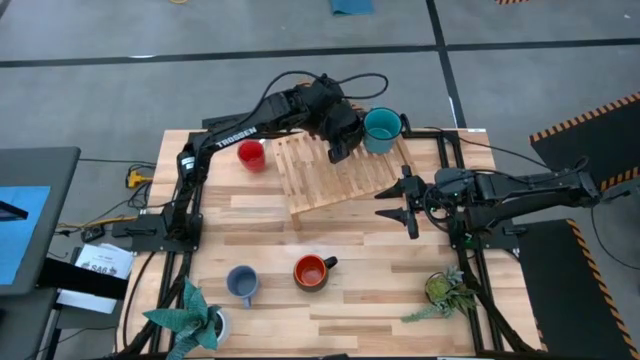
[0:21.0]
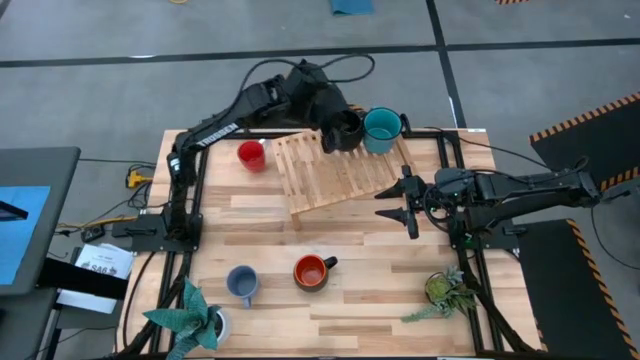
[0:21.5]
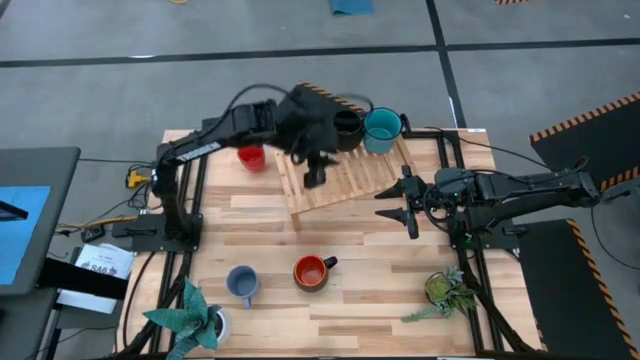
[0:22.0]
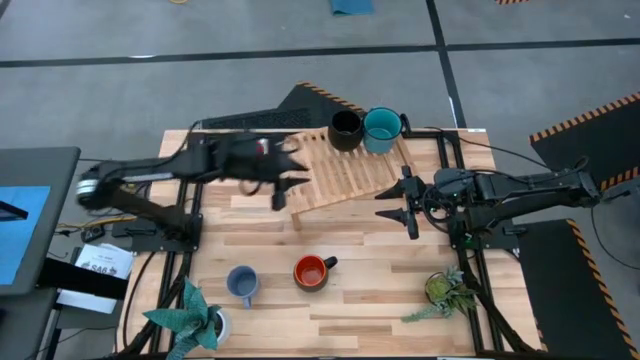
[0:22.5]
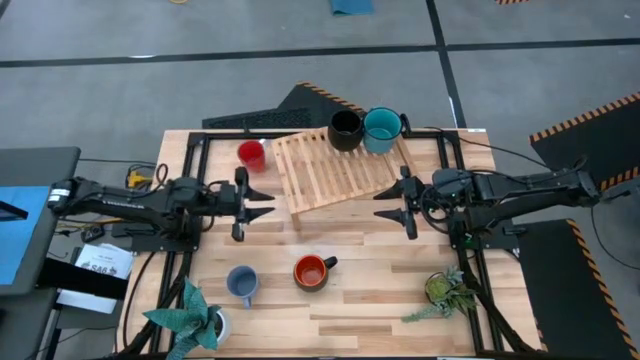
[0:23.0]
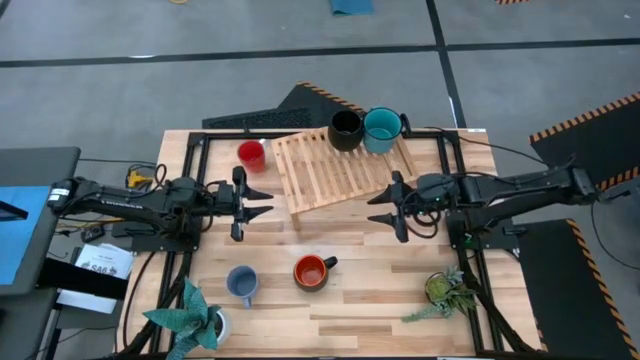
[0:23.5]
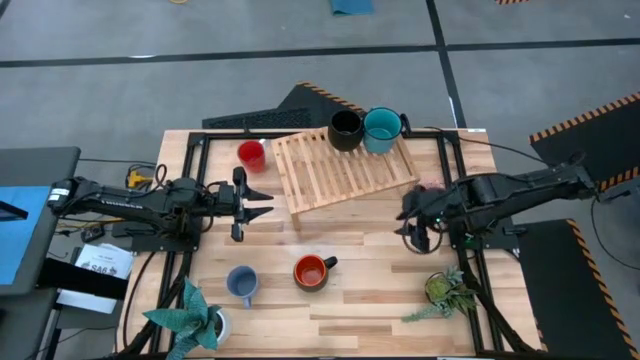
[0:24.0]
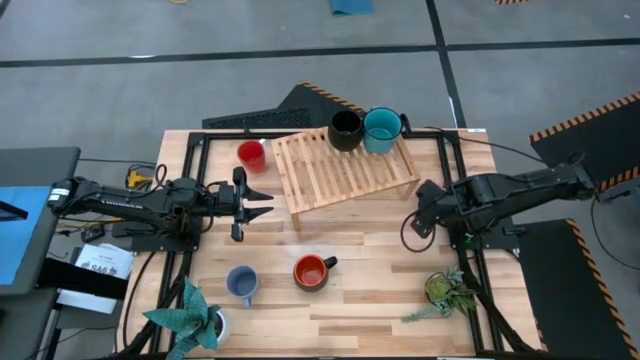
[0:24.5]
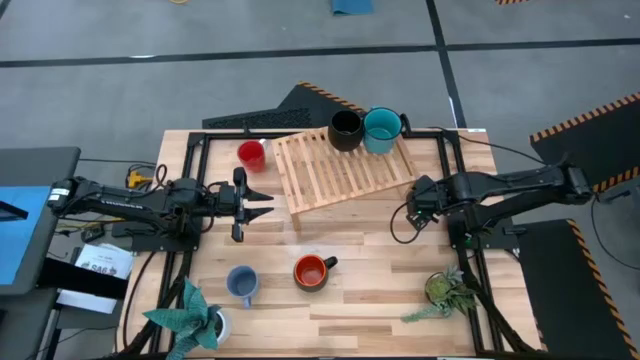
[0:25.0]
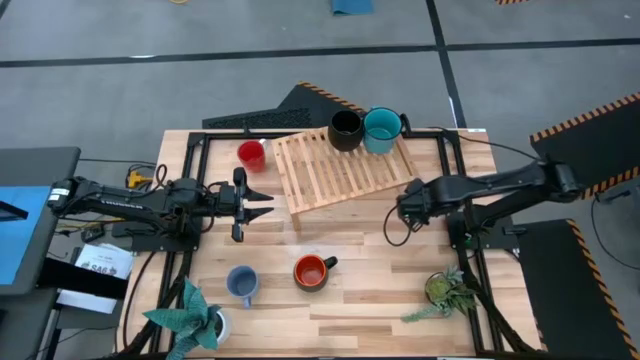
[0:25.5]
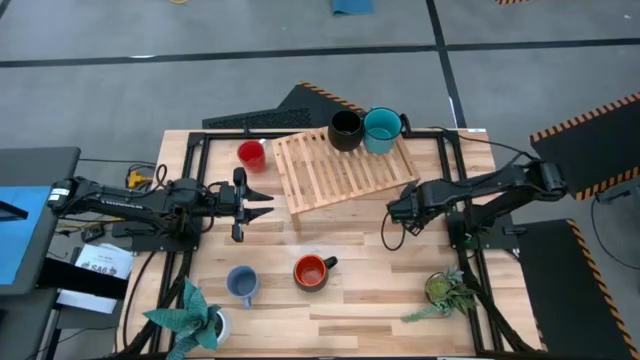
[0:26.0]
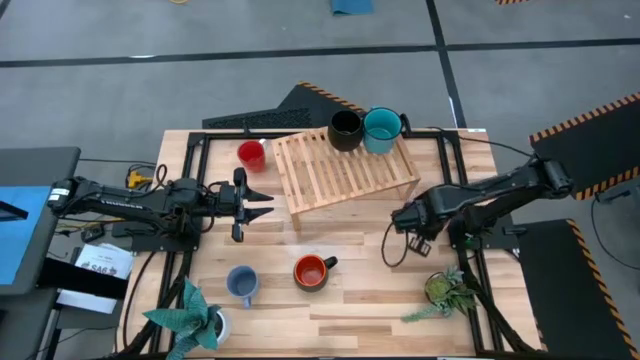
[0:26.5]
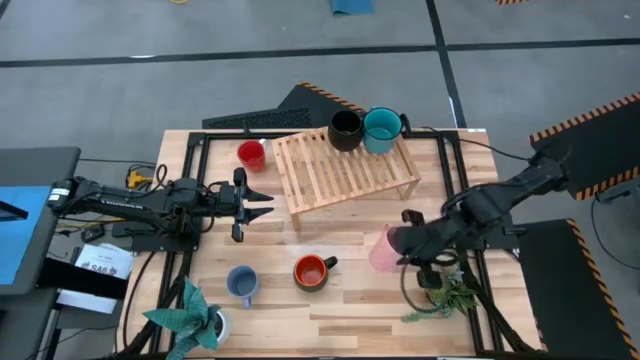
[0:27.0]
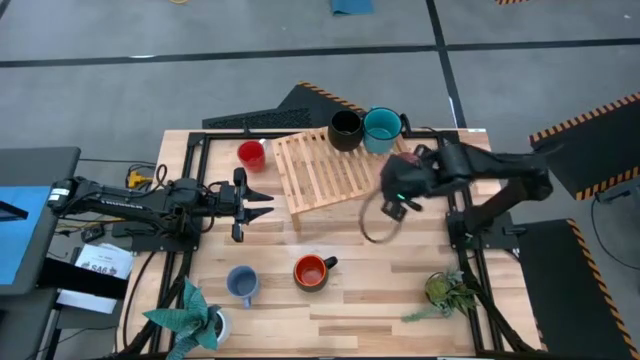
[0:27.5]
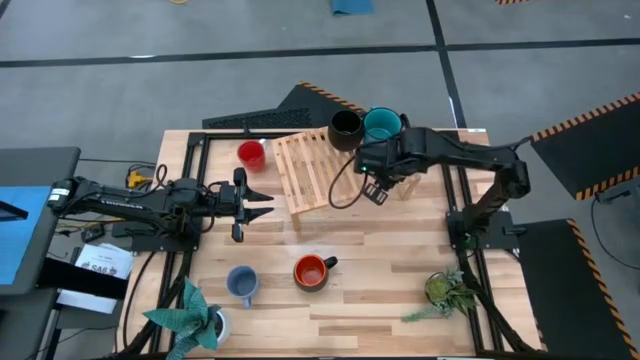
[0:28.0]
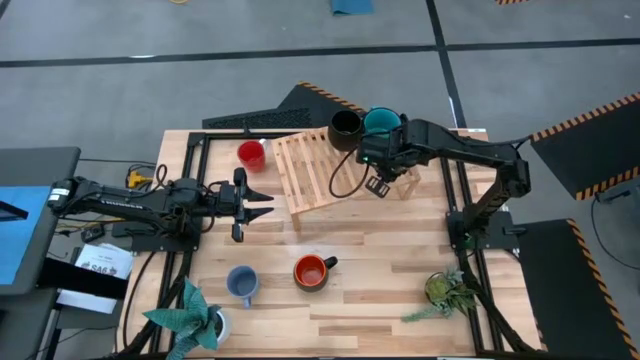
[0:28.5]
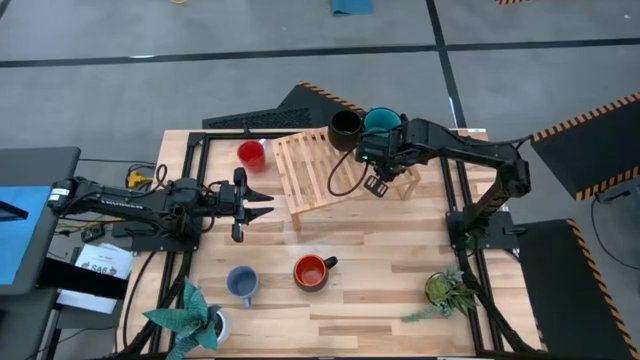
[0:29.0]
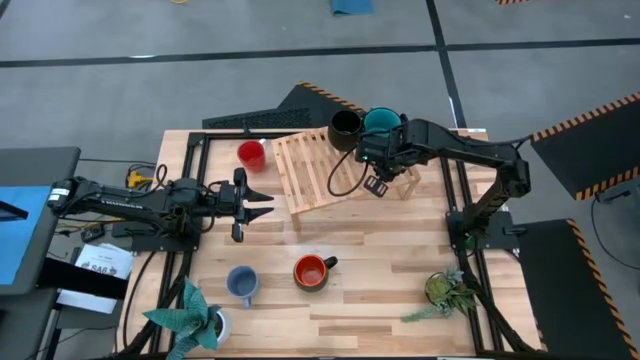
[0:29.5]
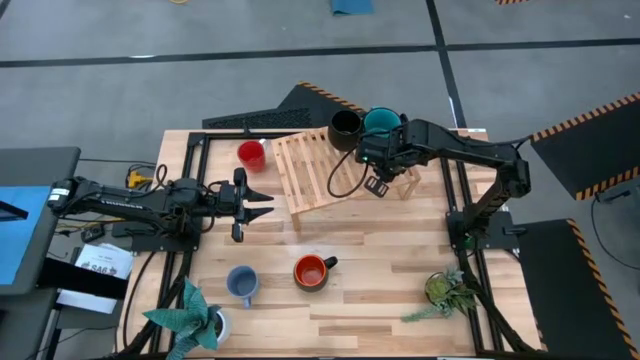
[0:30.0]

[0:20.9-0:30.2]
Task: Place coffee mugs
Put the pink mug on the shelf

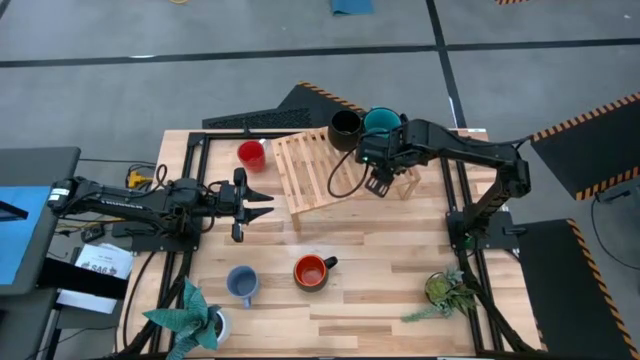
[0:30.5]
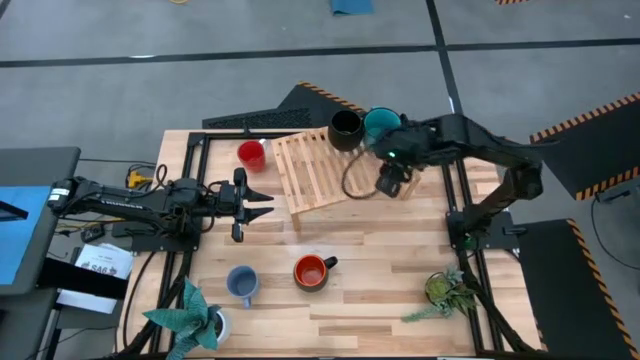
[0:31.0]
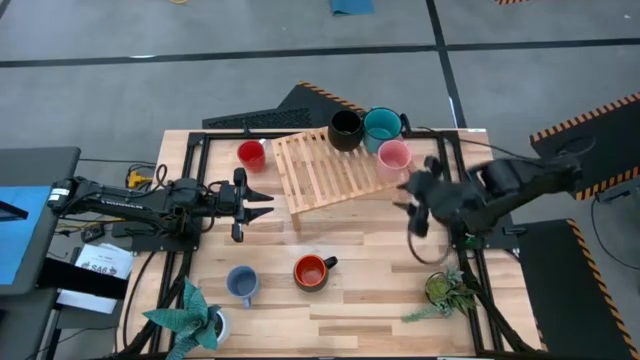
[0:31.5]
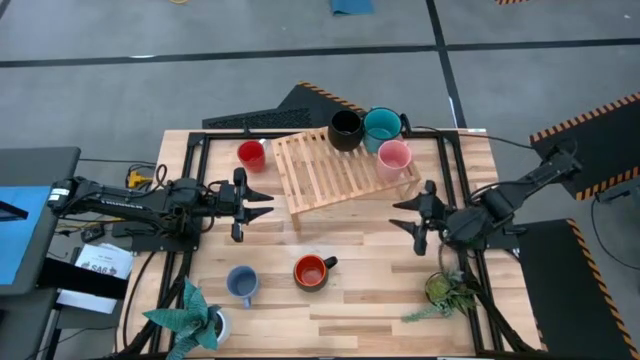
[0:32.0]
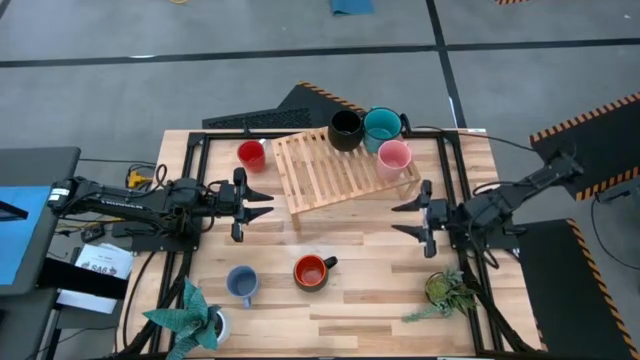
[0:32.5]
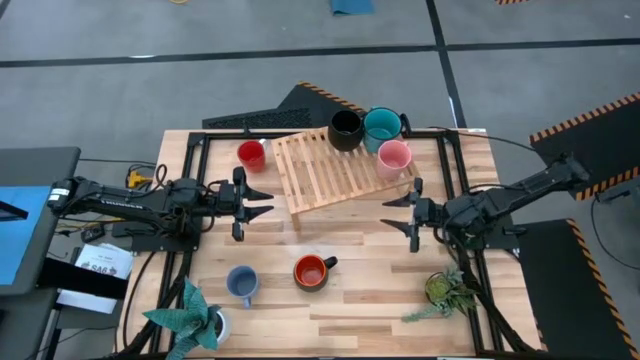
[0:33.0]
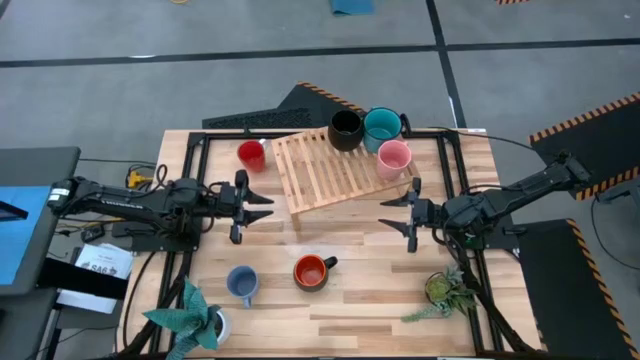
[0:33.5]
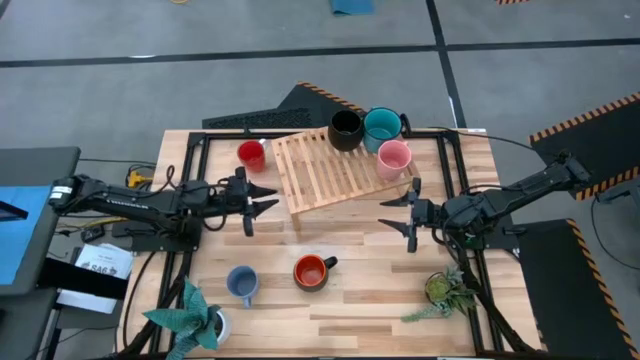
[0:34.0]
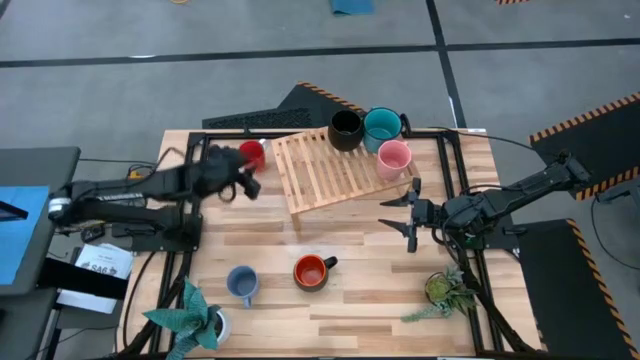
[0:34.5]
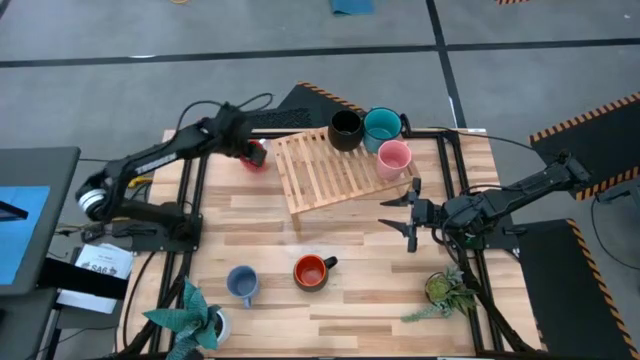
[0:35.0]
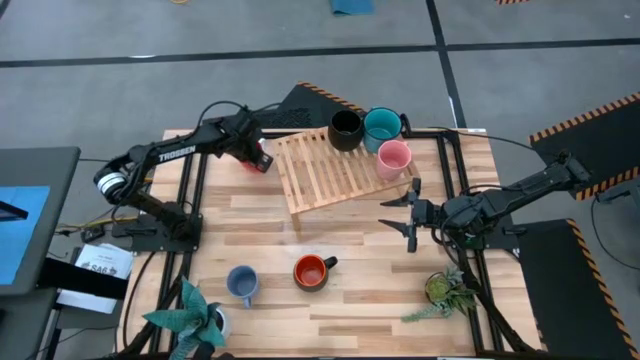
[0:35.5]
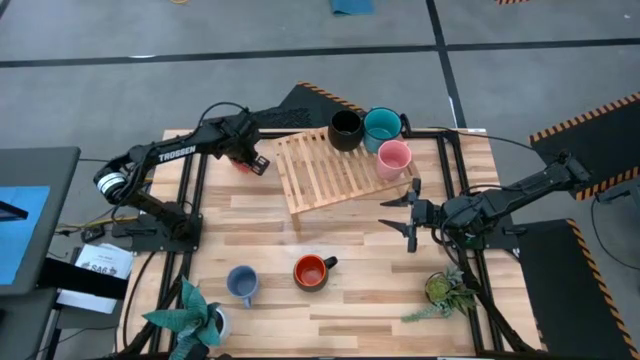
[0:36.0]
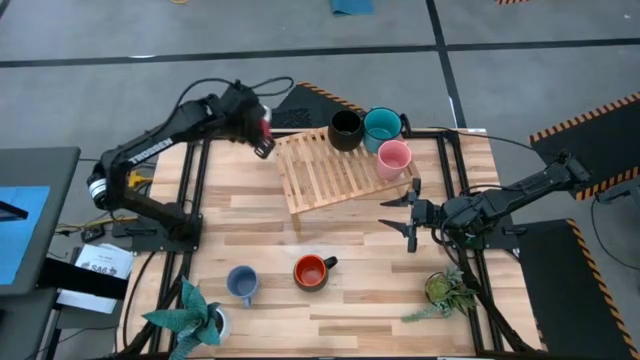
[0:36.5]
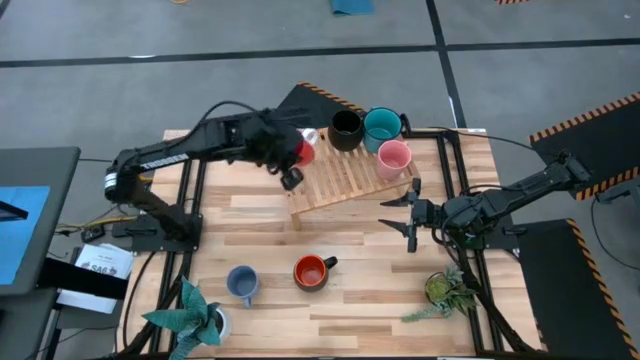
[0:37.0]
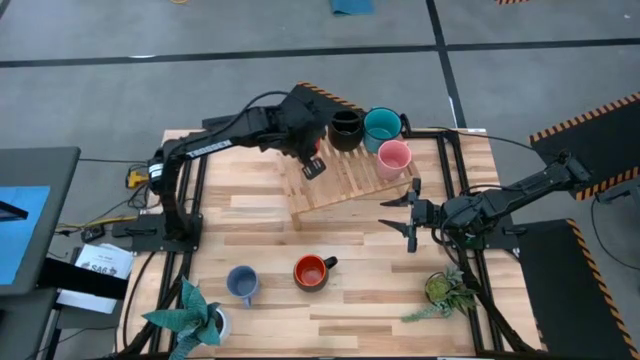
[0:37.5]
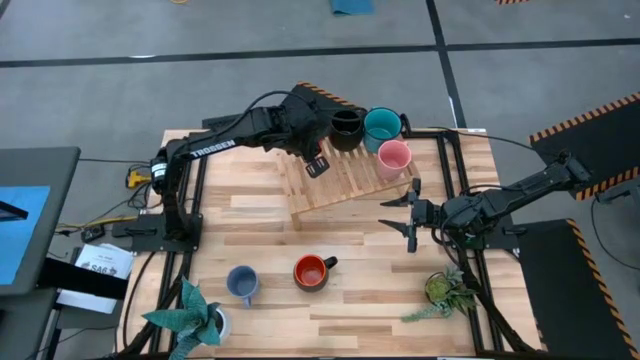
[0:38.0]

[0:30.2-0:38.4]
Put the red mug on the shelf

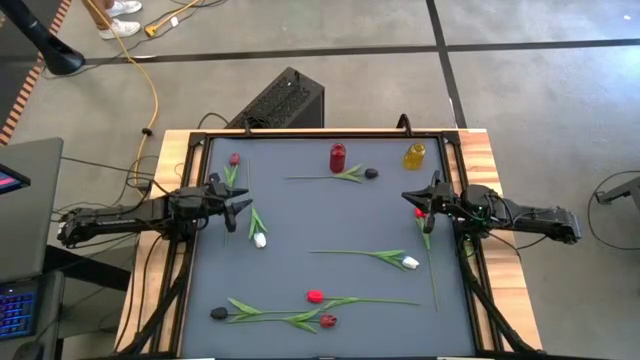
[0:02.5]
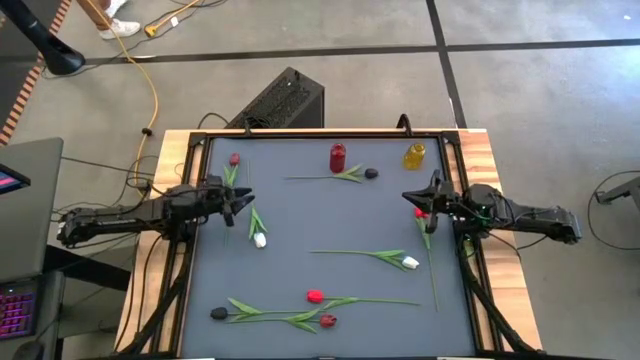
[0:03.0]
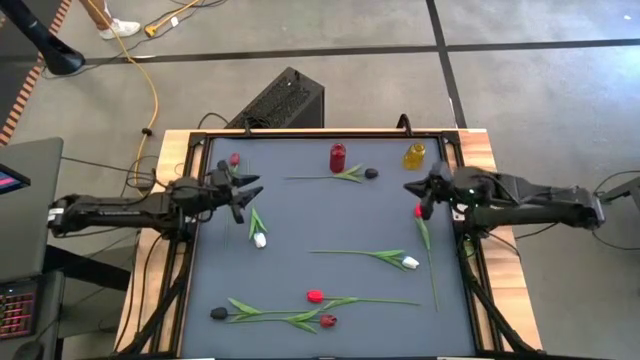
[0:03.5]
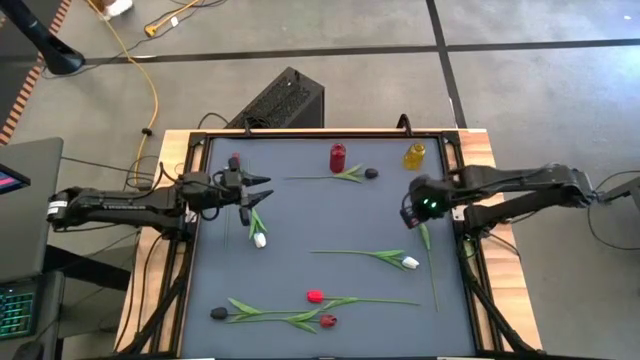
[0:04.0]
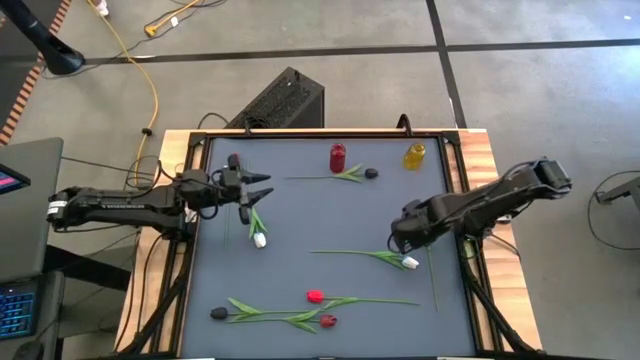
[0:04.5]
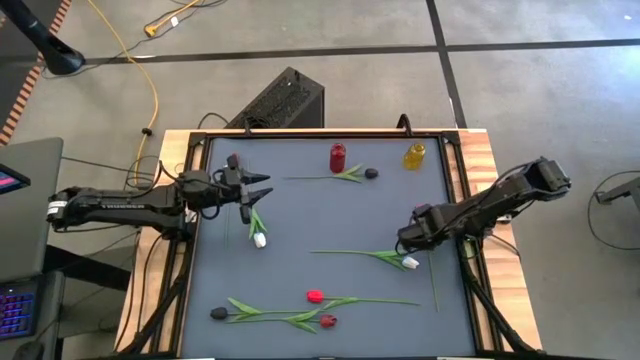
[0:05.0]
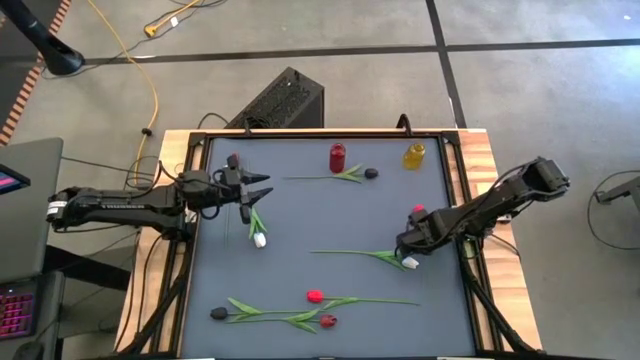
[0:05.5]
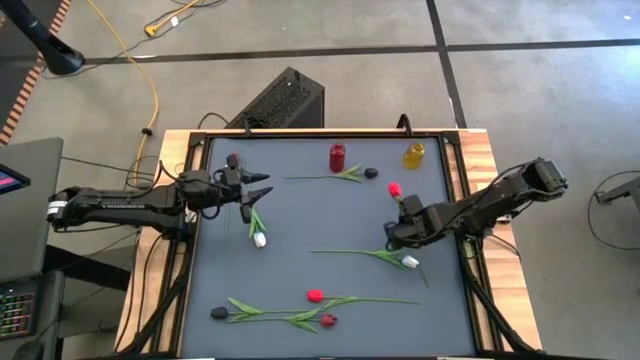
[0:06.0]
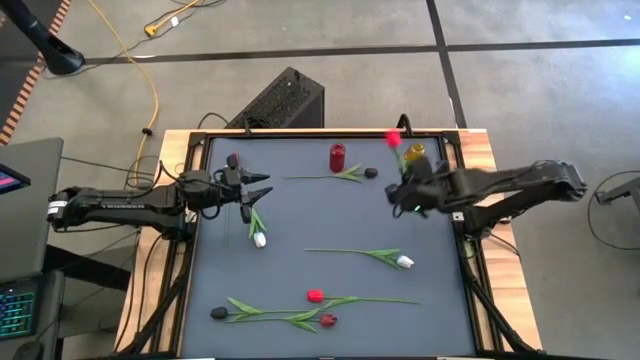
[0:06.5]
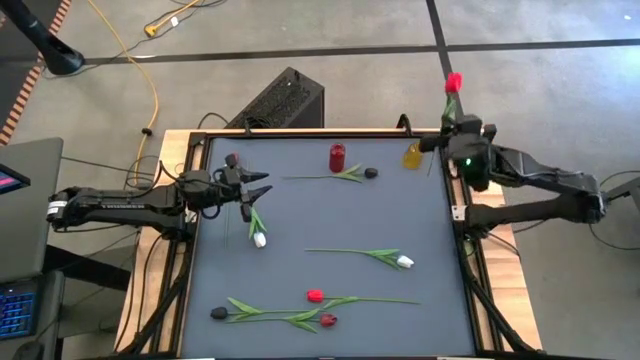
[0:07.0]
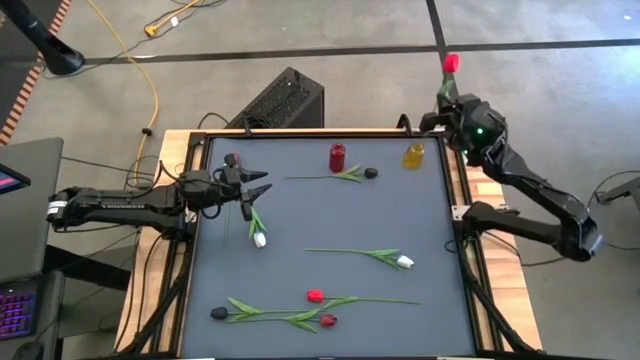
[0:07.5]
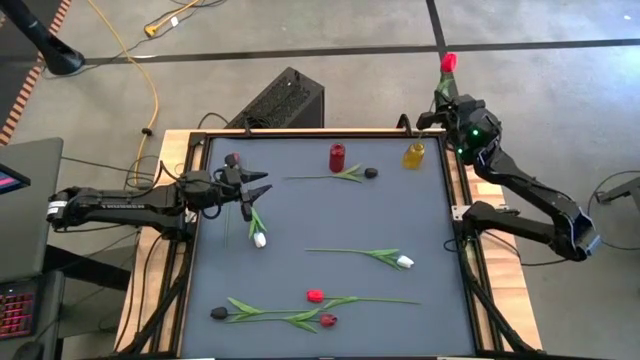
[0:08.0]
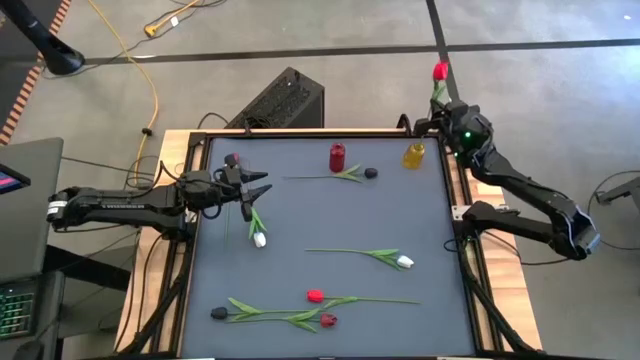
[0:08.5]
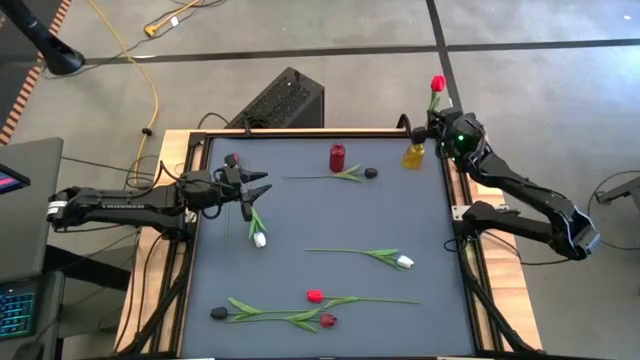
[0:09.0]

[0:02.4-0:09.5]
Task: Sort flowers into vase by color
Put the top red tulip into the yellow vase
